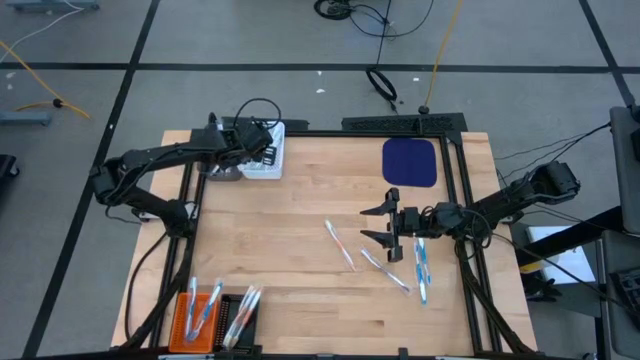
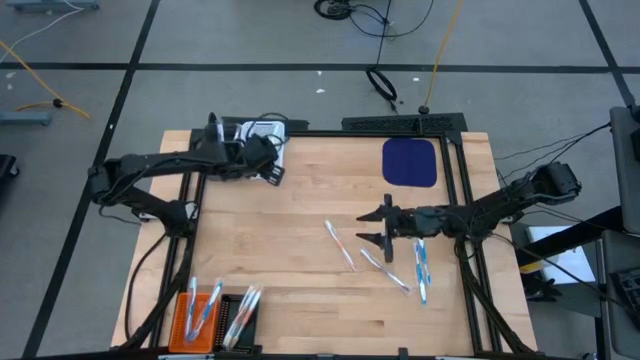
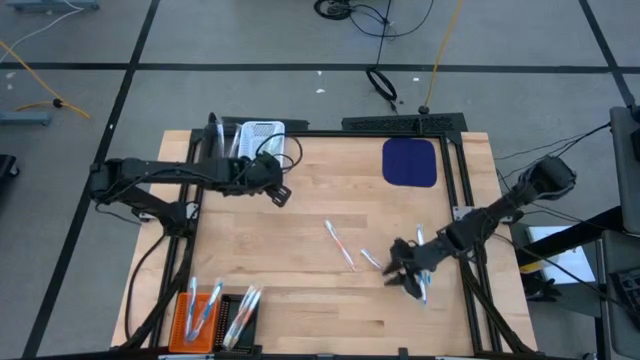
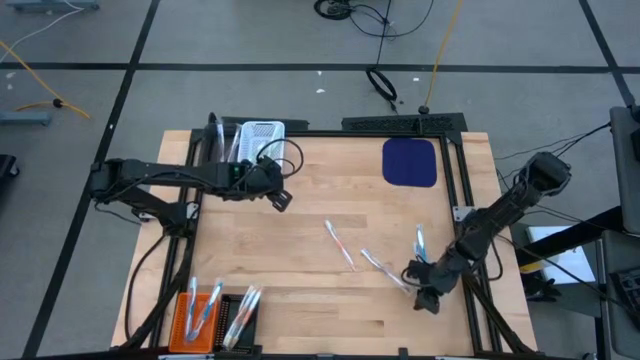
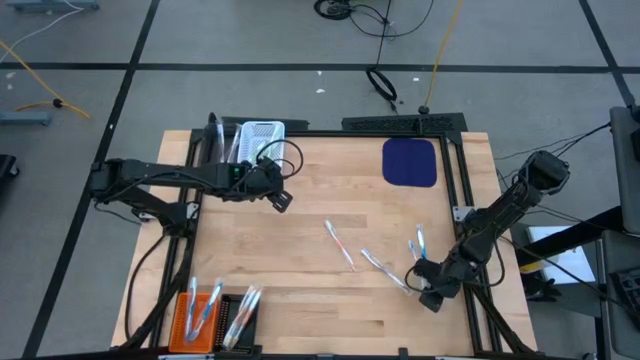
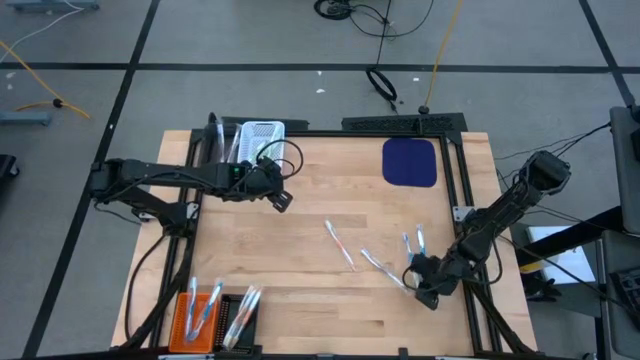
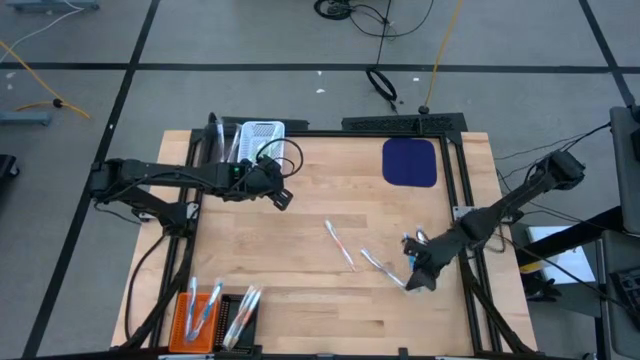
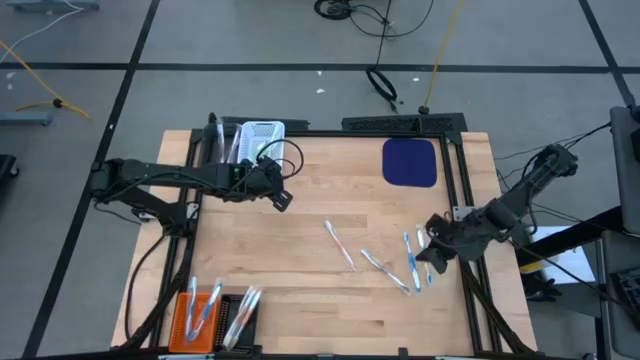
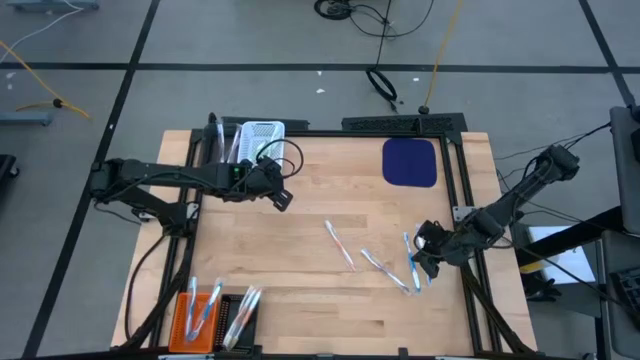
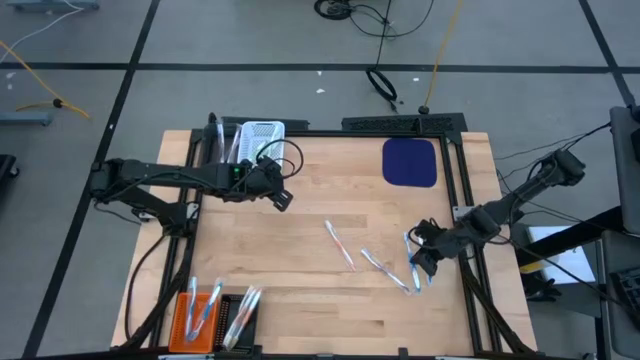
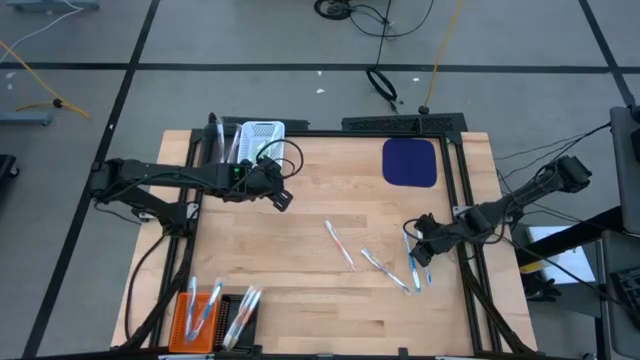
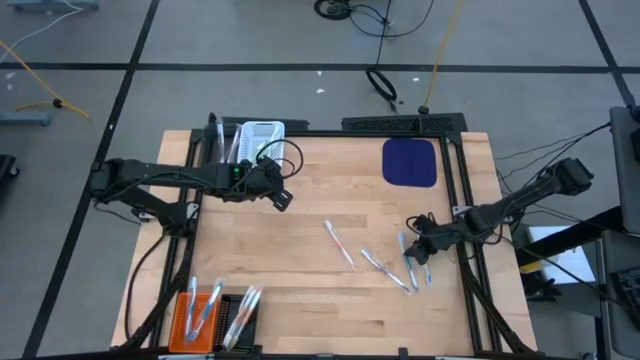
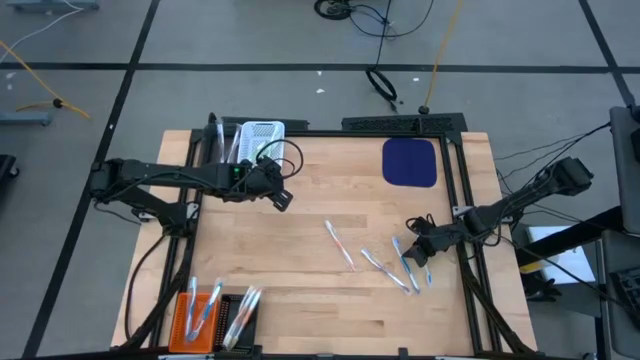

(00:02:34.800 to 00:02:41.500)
Task: Pick & Place Toothbrushes
Put the blue toothbrush into the orange bin

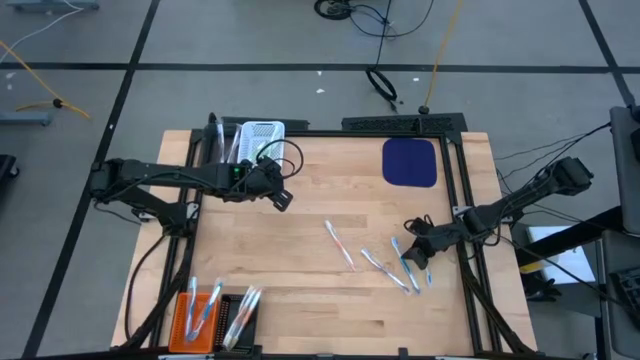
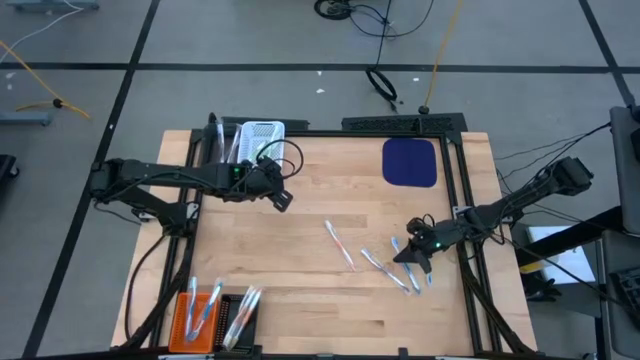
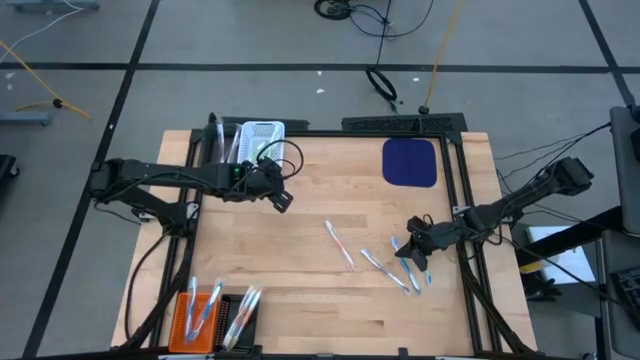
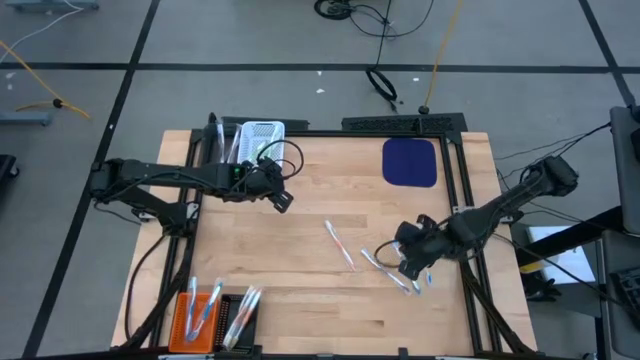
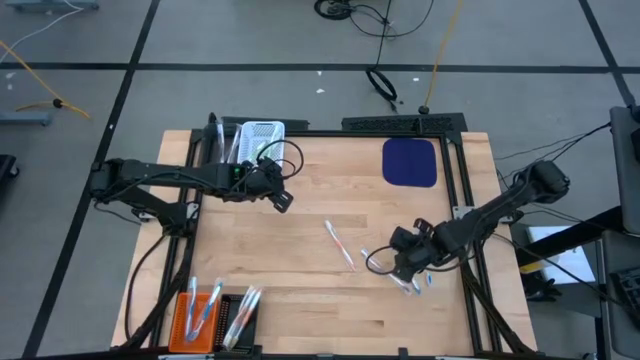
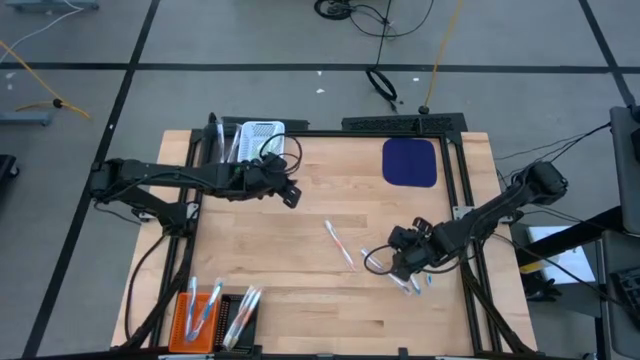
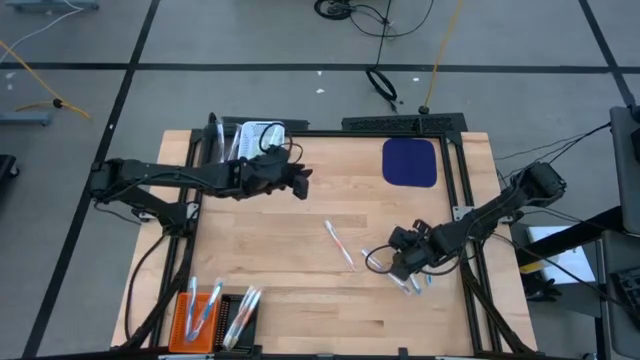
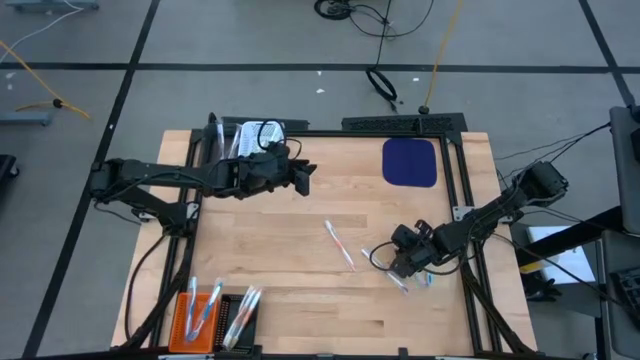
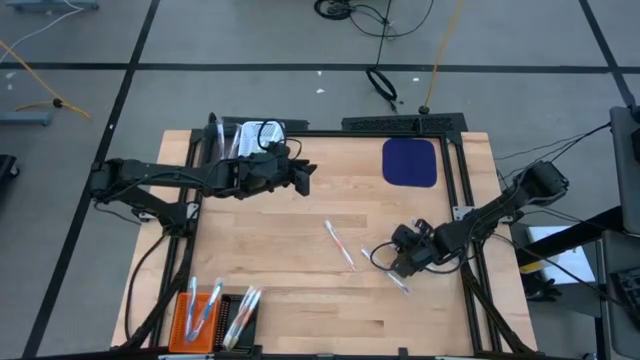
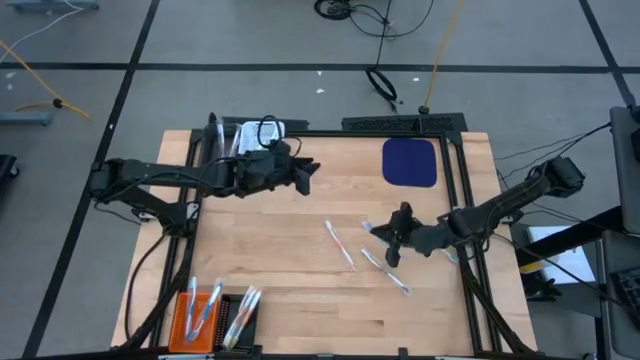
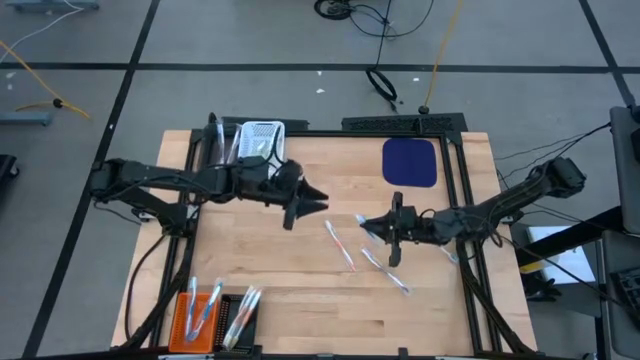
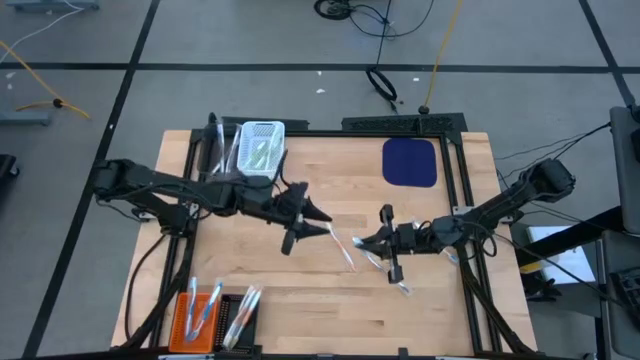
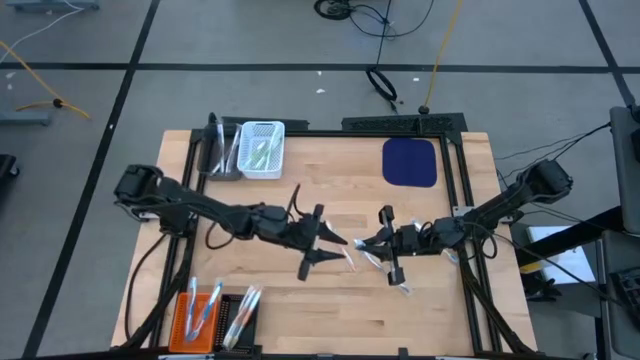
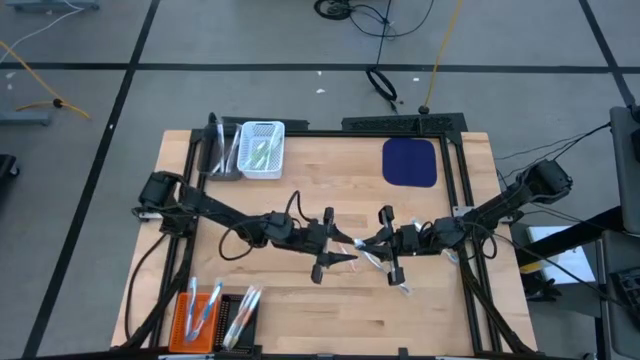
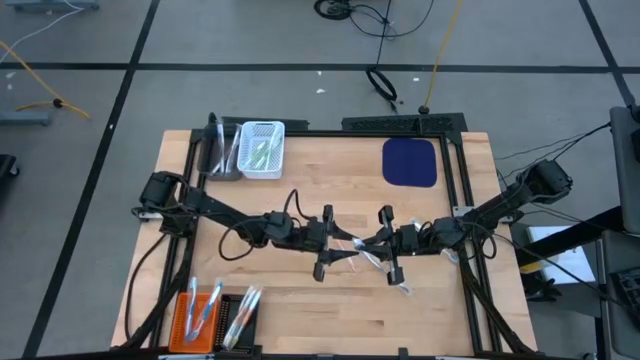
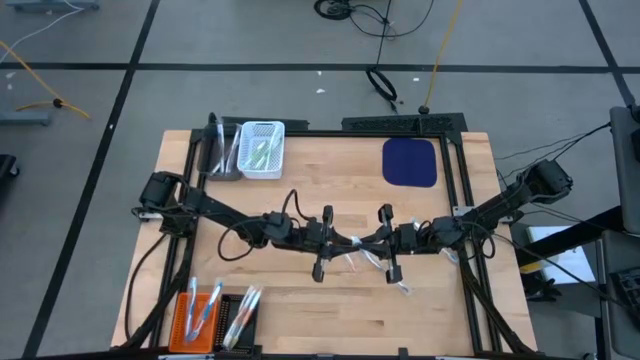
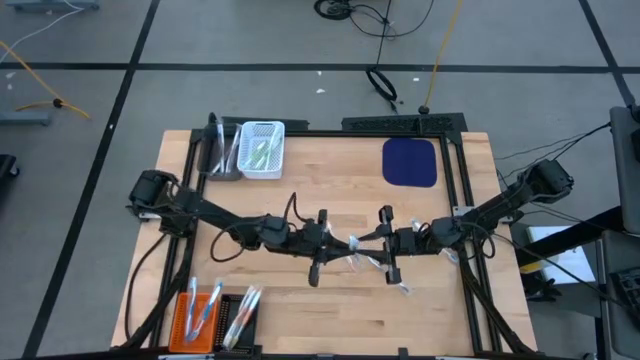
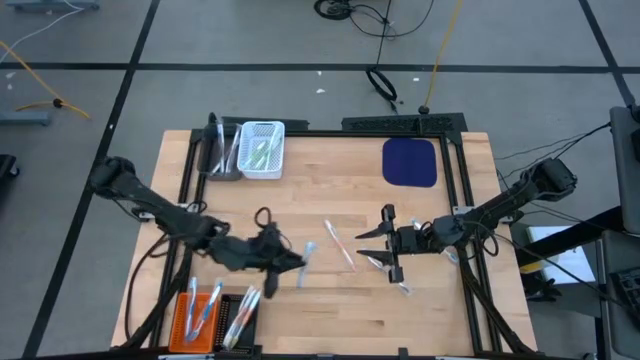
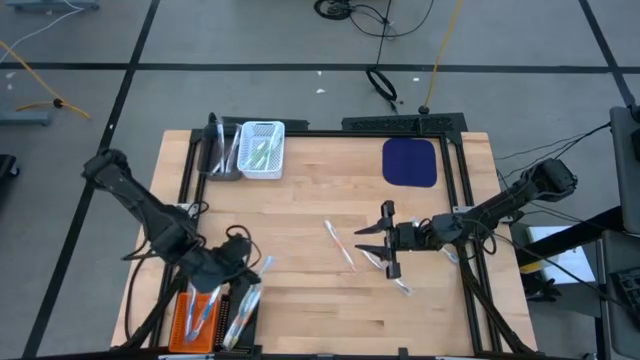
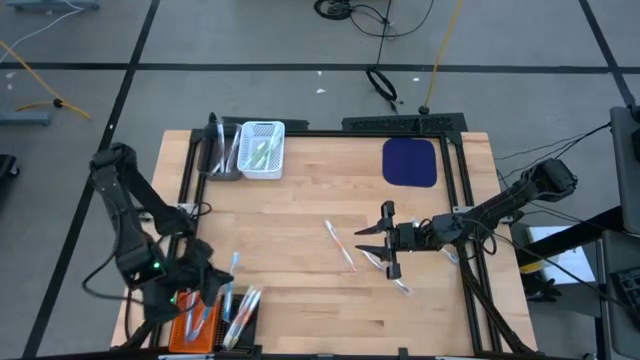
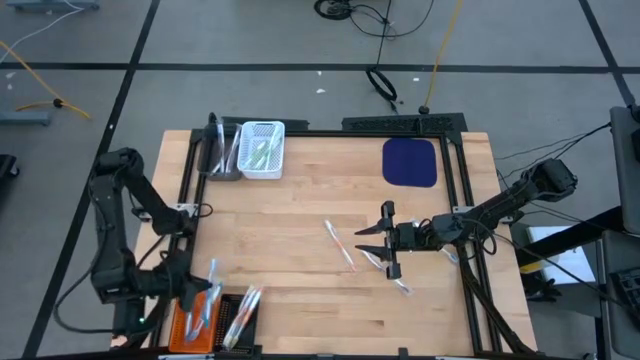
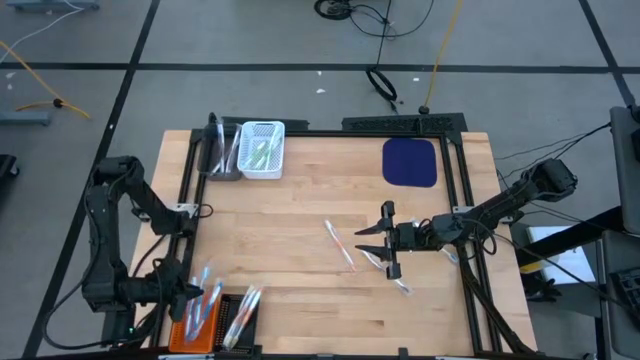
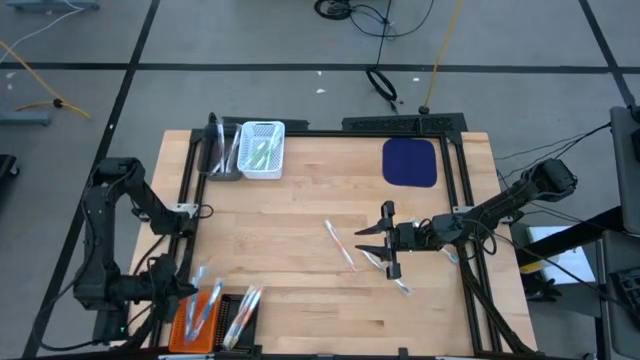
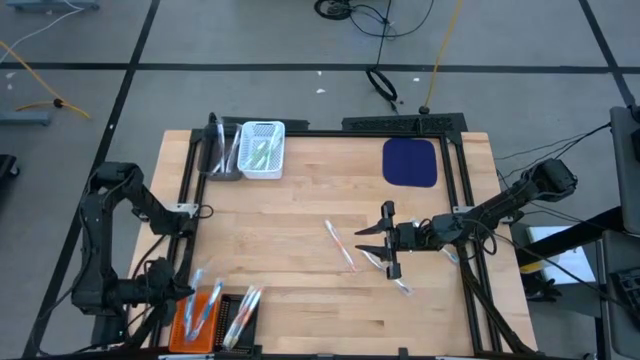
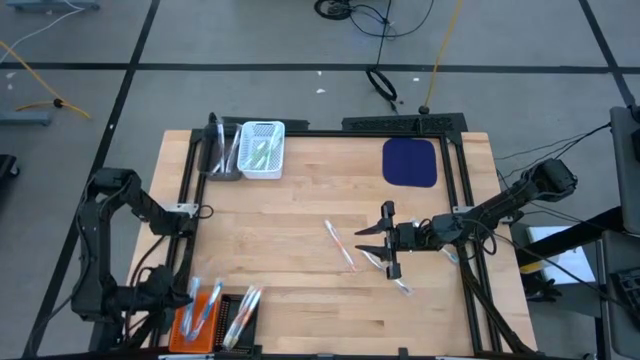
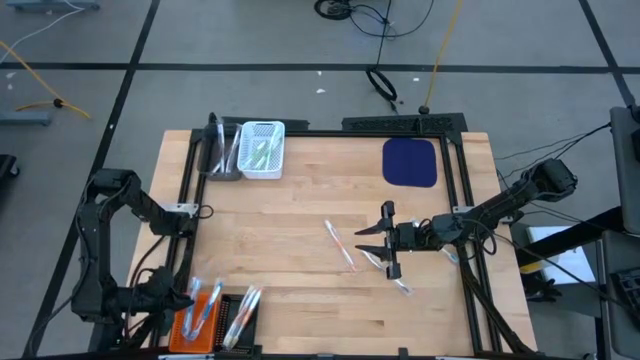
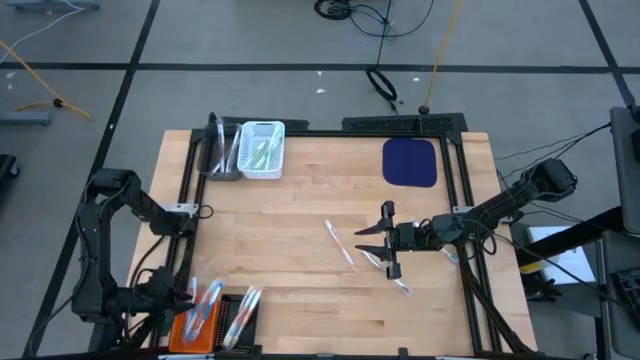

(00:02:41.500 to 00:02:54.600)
Put the blue toothbrush into the orange bin

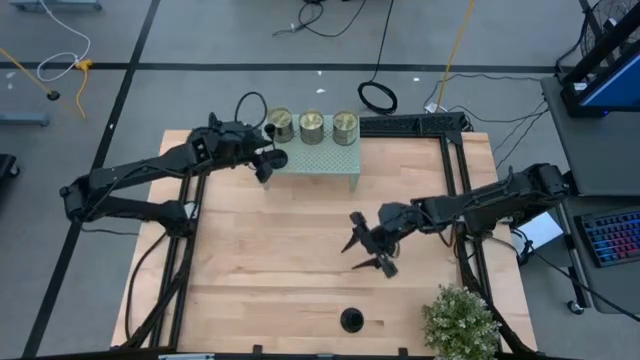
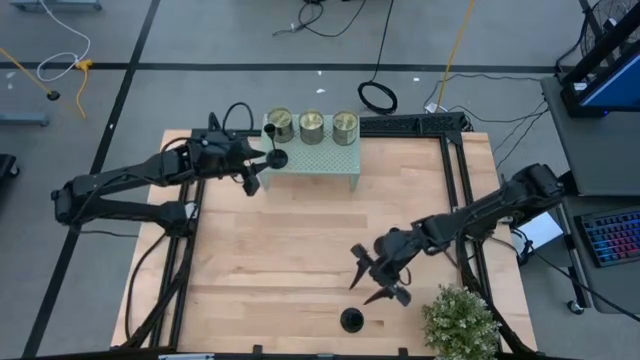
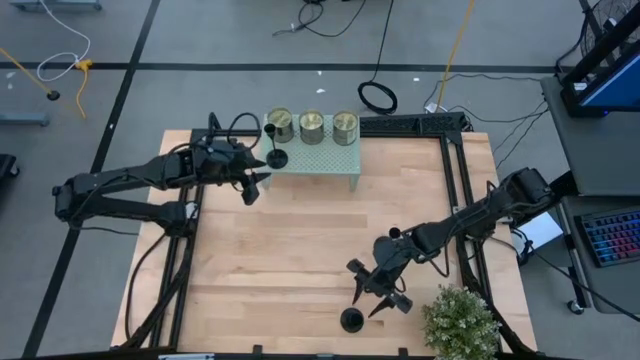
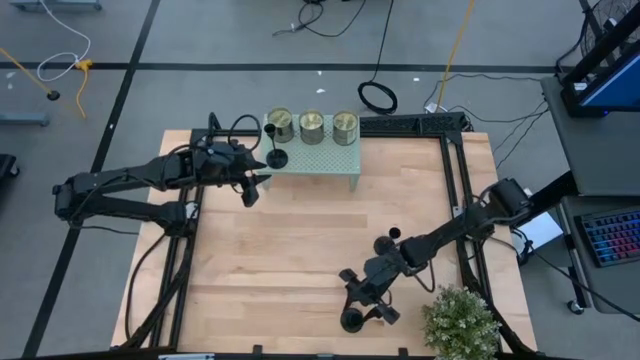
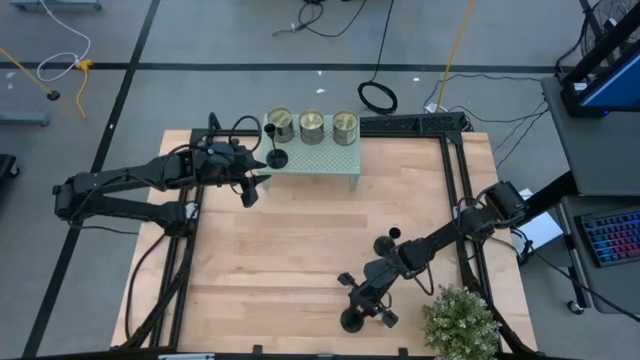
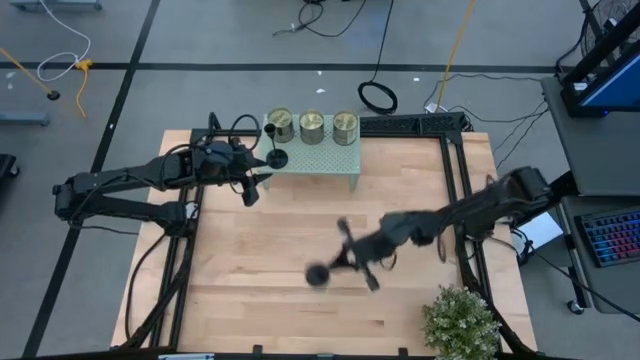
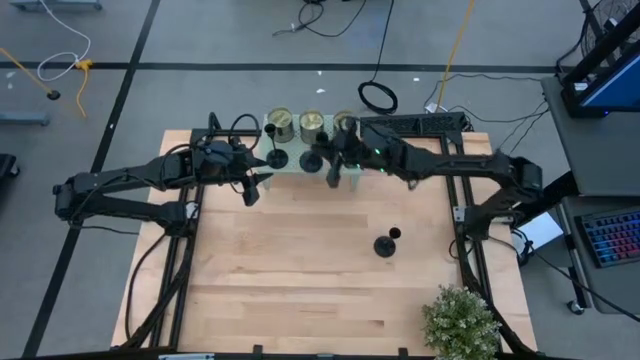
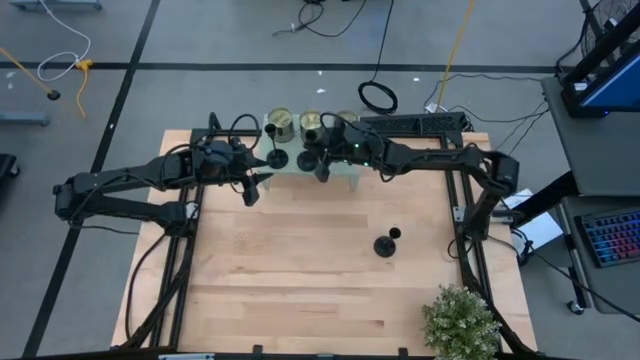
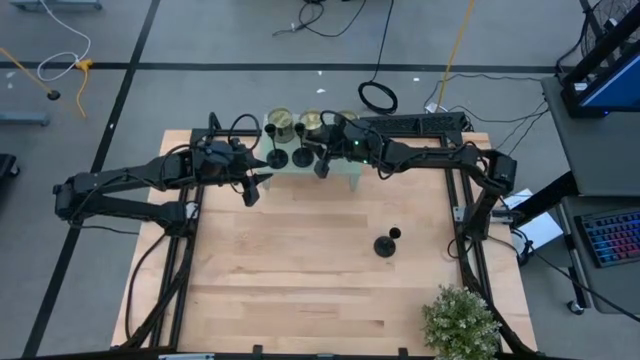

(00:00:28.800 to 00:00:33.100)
Task: Pick & Place candle stick holders
Put the bottom black candle holder on the shelf
